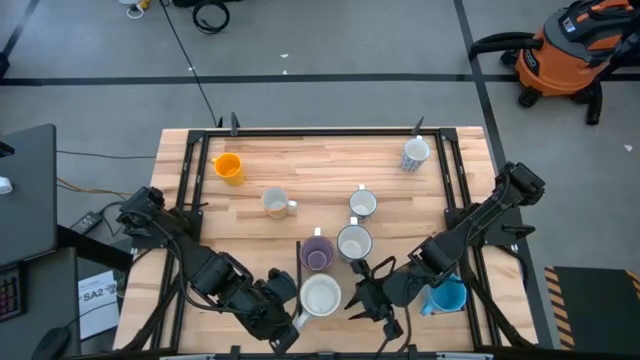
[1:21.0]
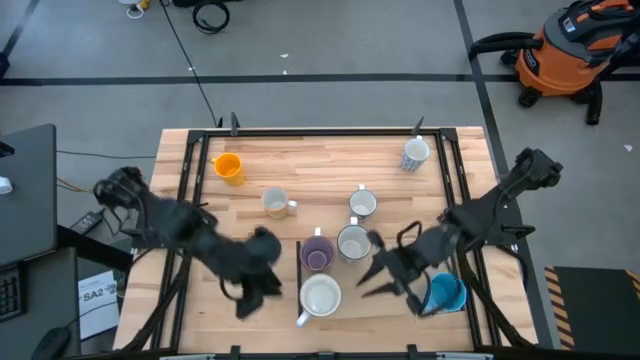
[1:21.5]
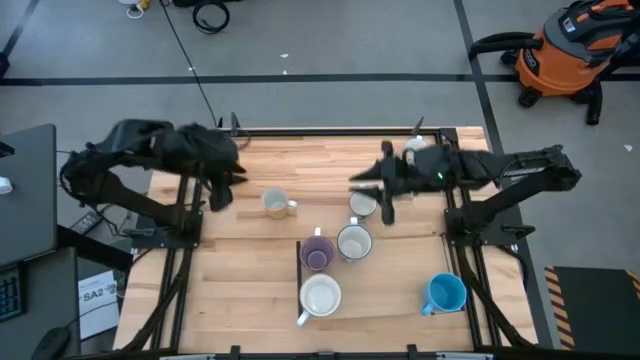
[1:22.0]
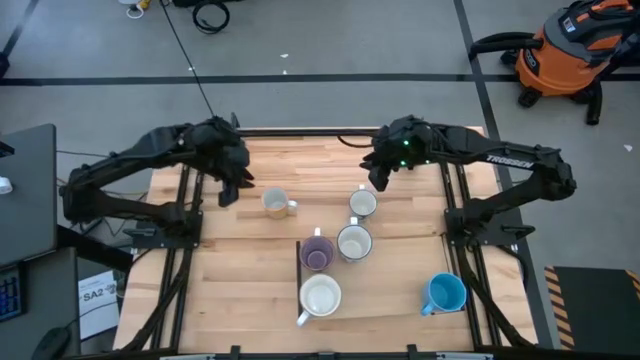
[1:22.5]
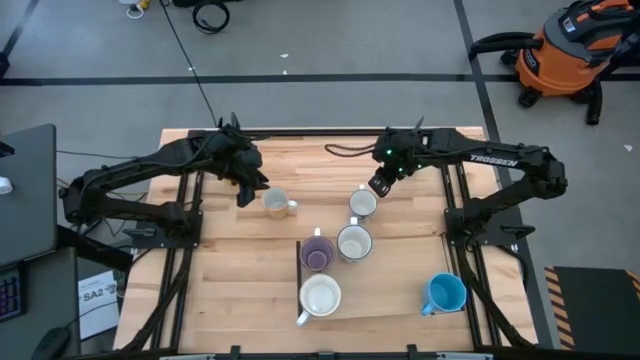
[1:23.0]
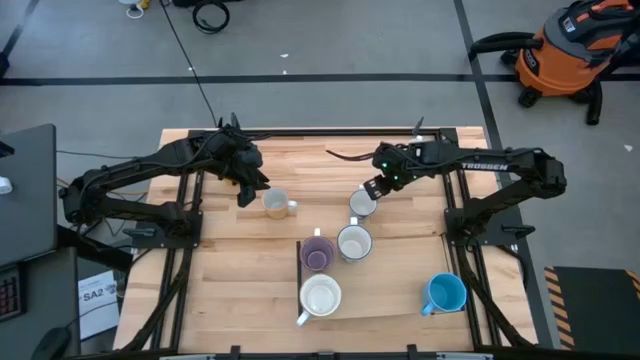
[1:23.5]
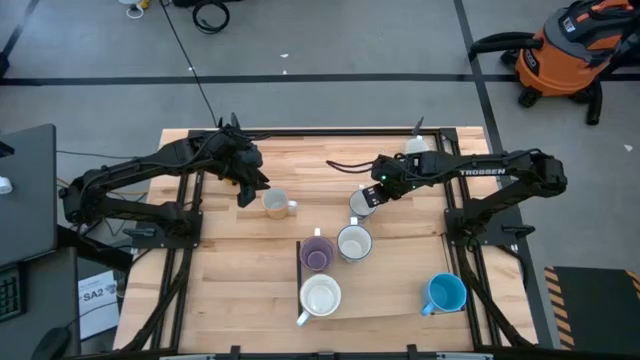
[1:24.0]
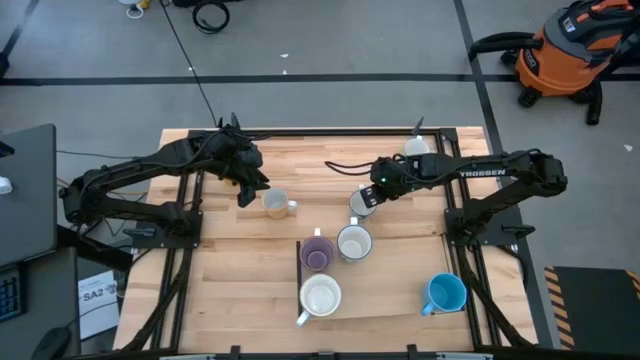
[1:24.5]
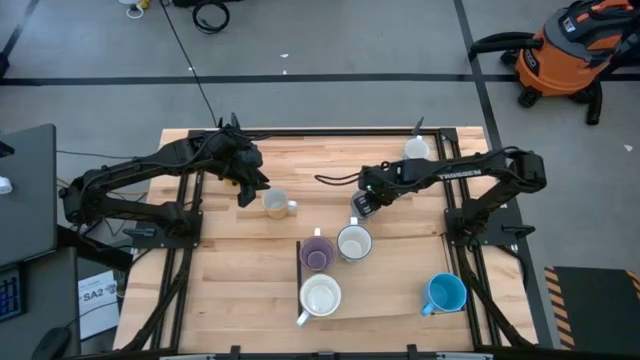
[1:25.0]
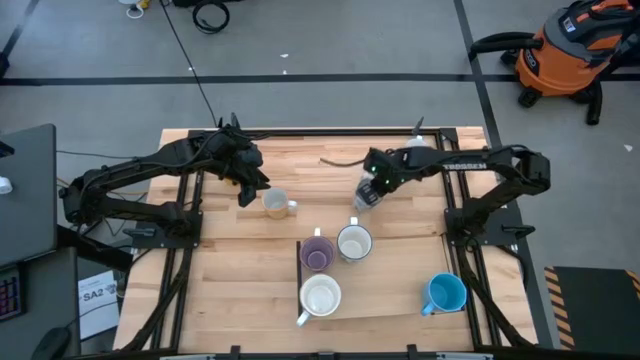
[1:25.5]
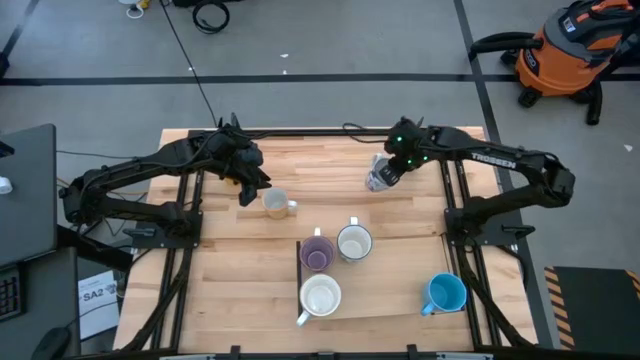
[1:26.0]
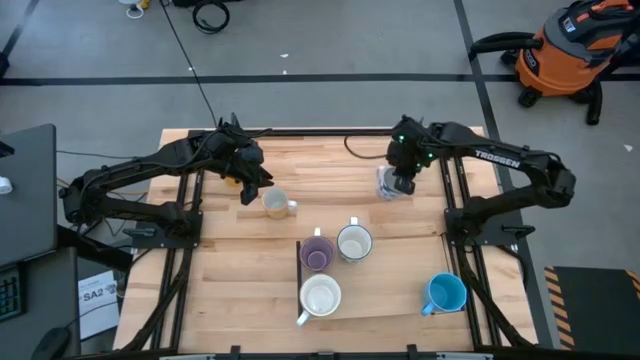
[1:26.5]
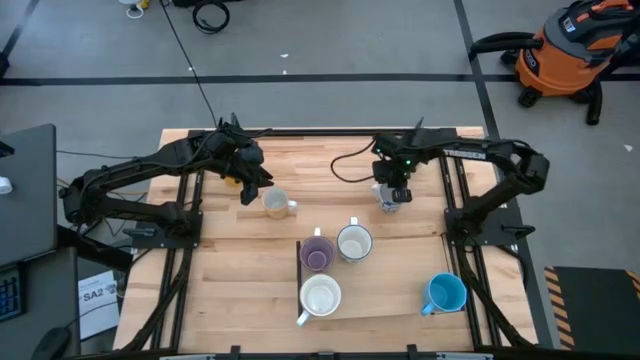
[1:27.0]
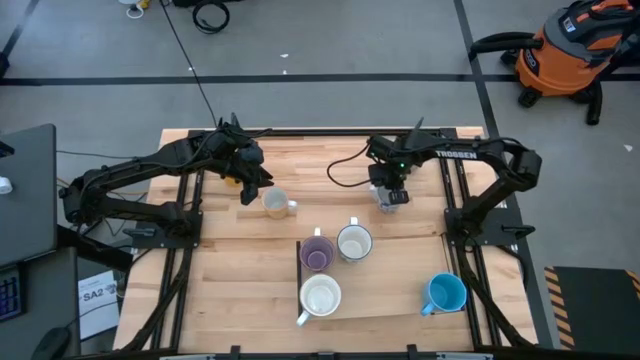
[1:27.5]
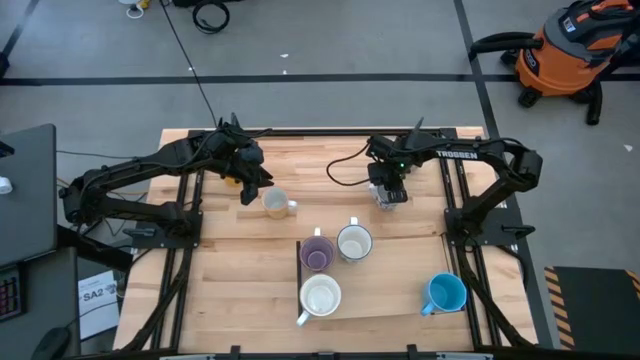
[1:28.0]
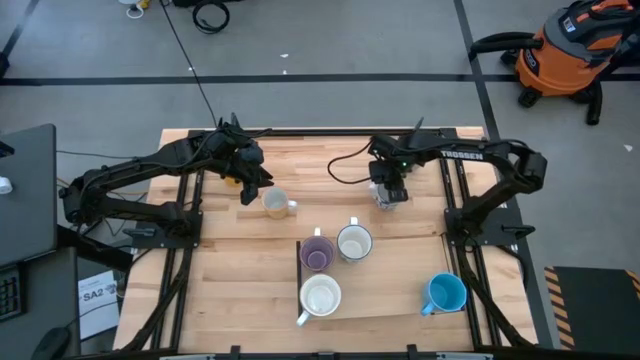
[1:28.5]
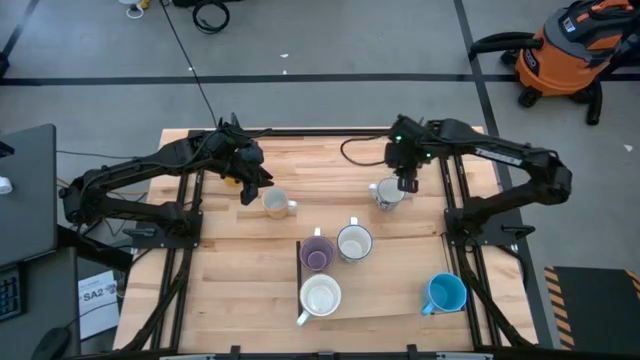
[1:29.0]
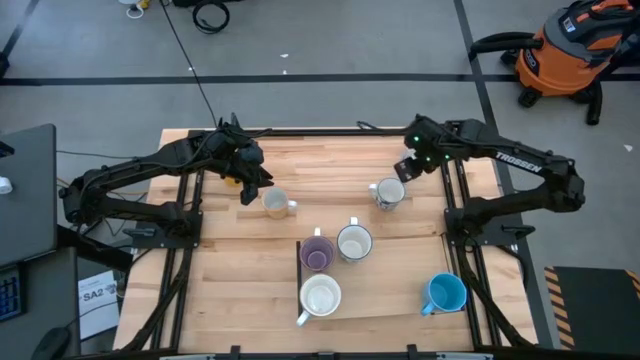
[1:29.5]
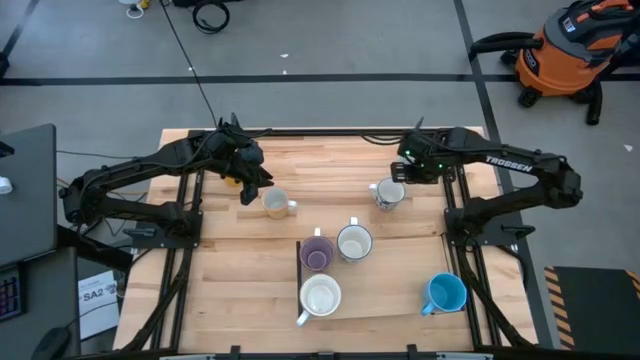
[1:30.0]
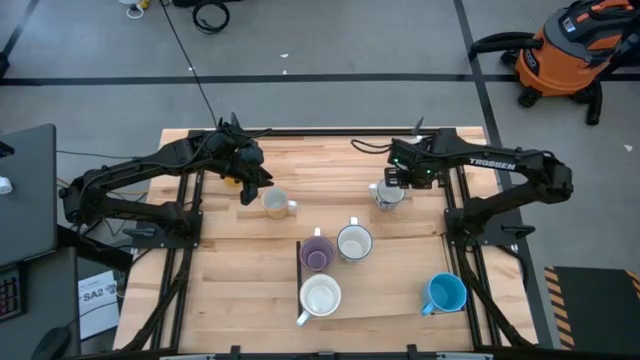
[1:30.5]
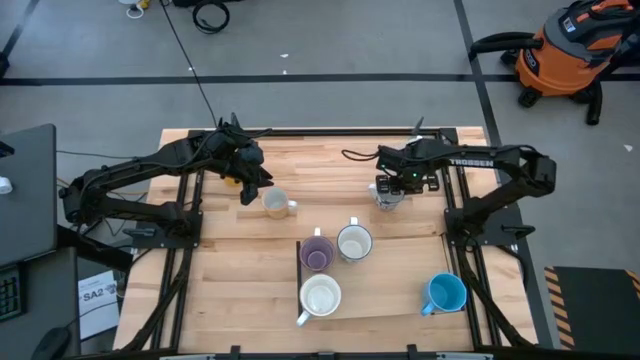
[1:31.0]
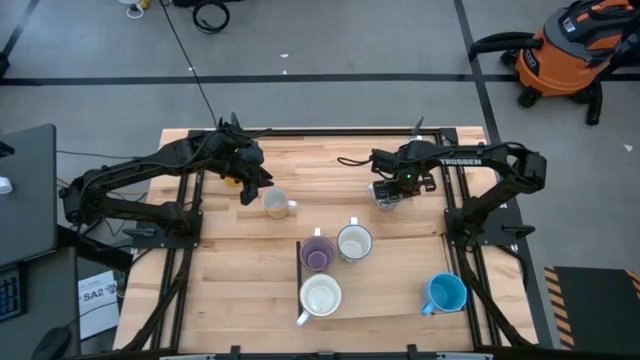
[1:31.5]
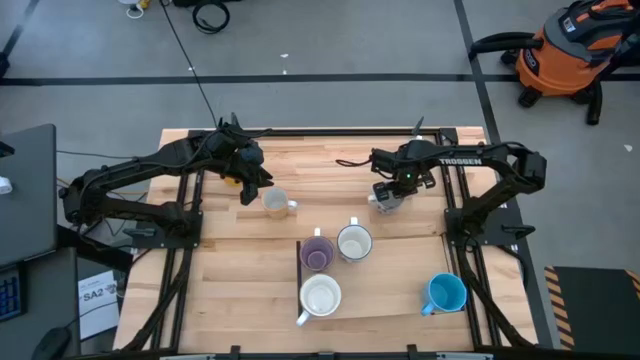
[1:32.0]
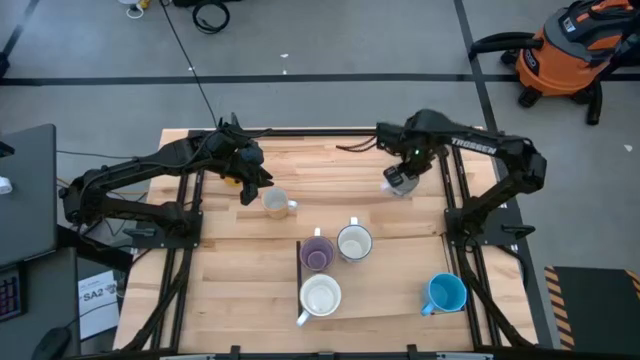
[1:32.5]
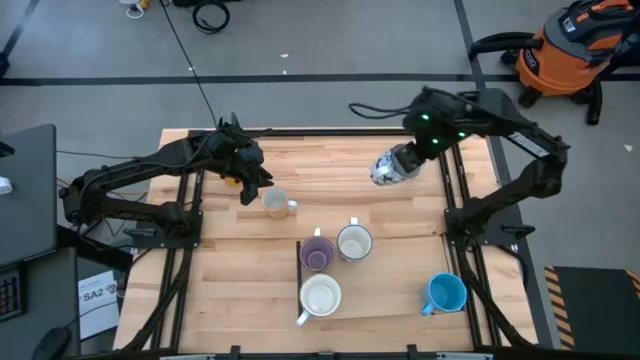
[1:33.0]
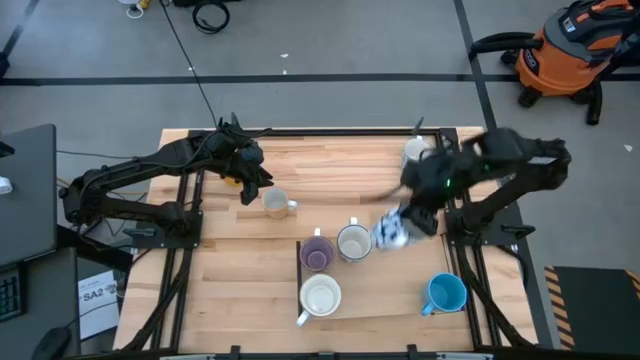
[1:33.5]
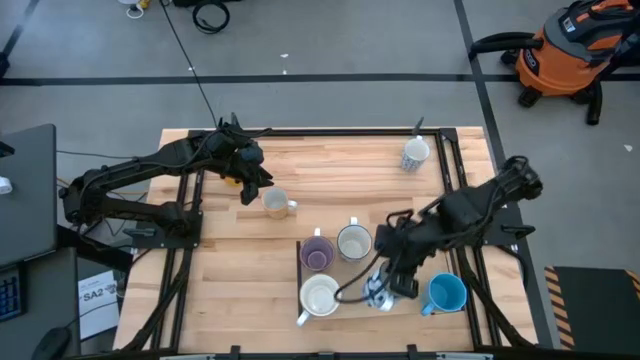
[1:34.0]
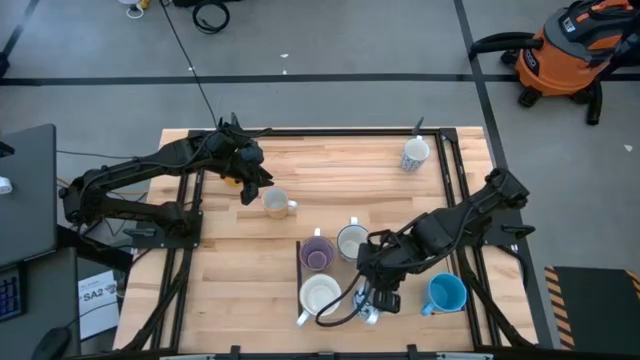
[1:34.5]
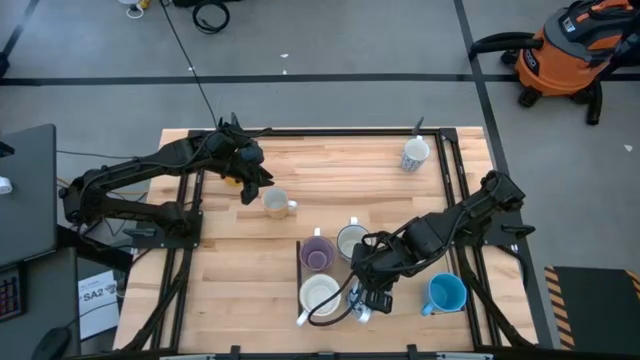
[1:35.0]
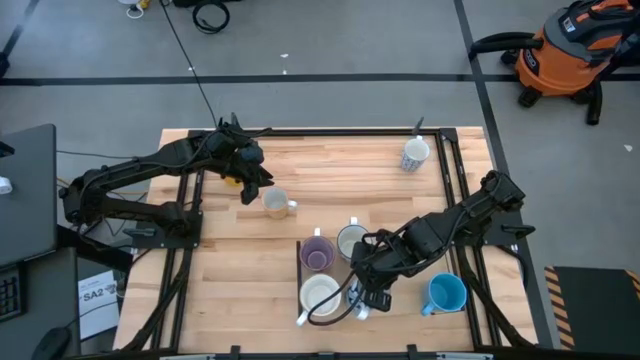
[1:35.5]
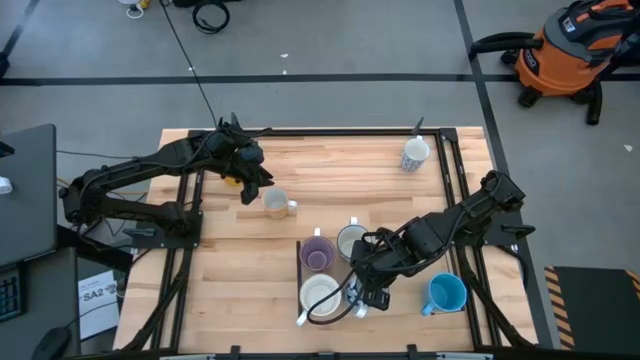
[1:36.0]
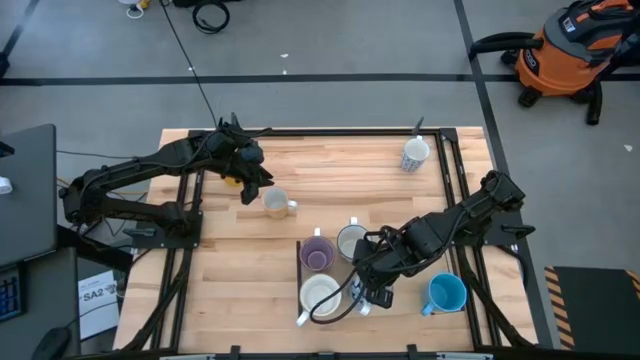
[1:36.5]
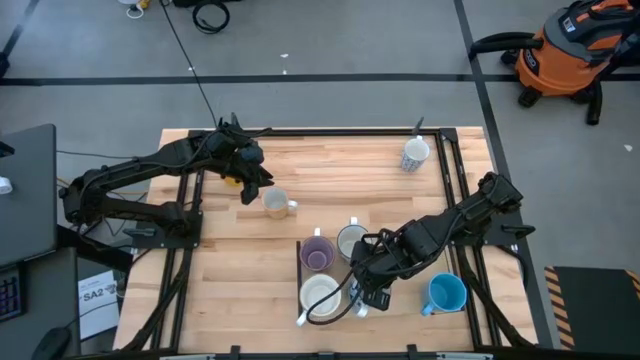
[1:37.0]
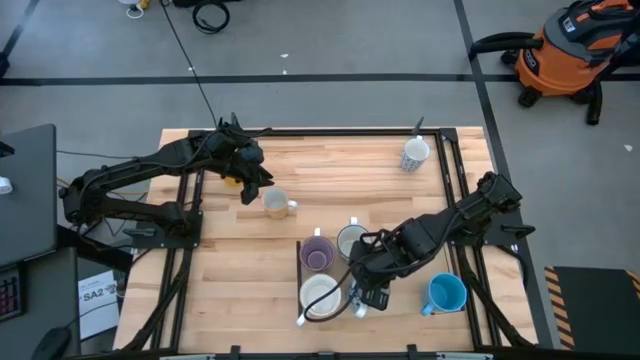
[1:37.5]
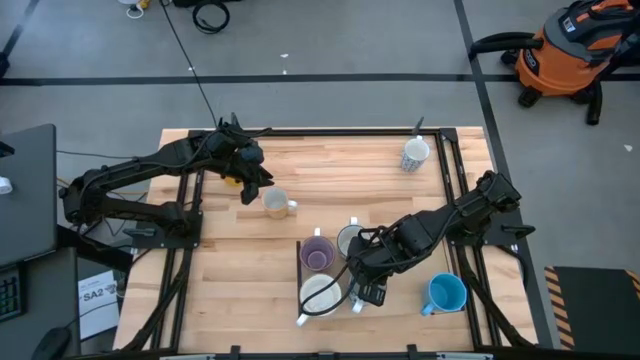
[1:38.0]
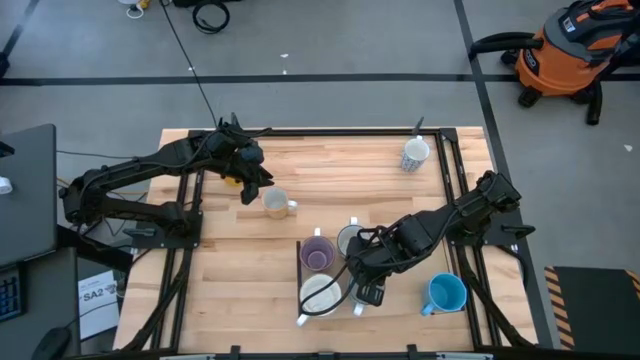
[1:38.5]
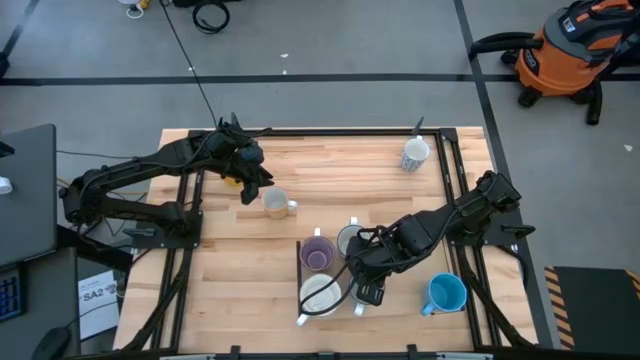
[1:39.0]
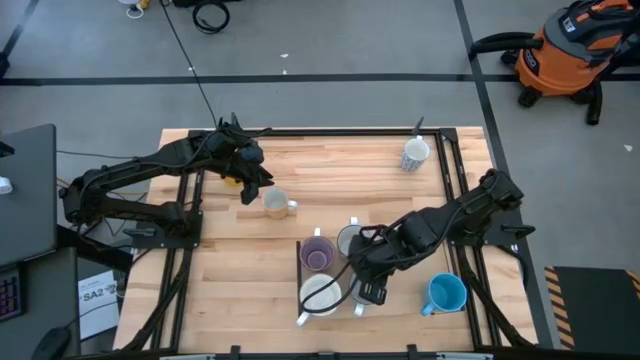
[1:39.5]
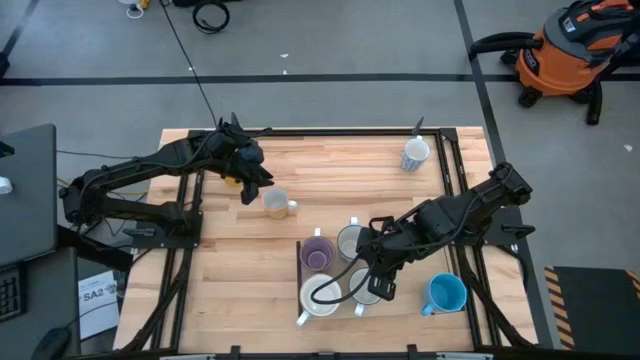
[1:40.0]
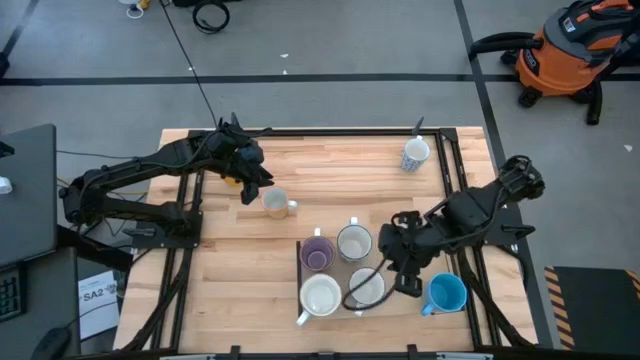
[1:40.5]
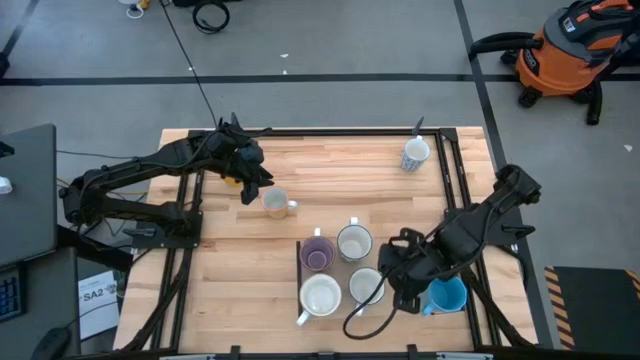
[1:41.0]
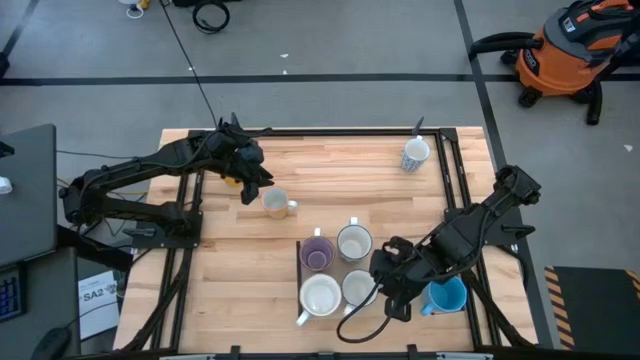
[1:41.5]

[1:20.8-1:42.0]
Task: Place coffee mugs
Put the bottom white blue patterned mug on the shelf

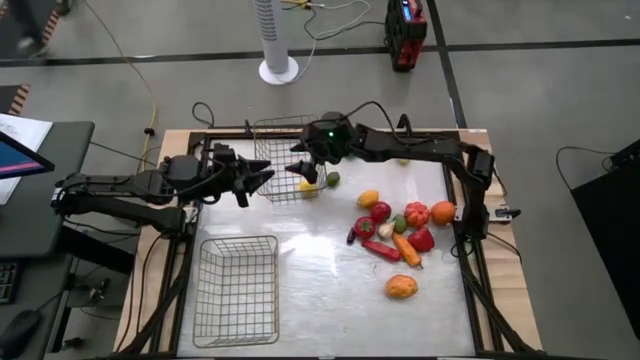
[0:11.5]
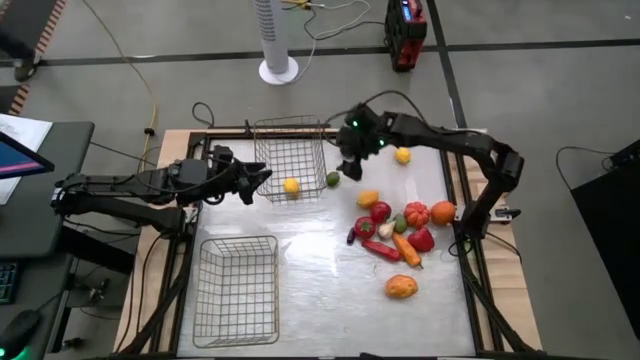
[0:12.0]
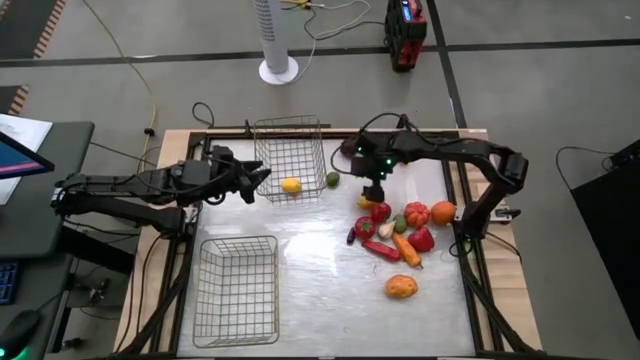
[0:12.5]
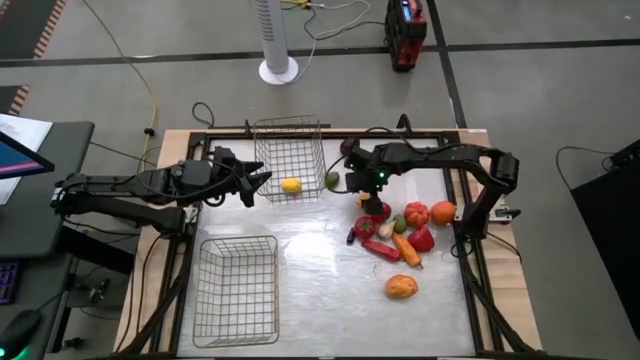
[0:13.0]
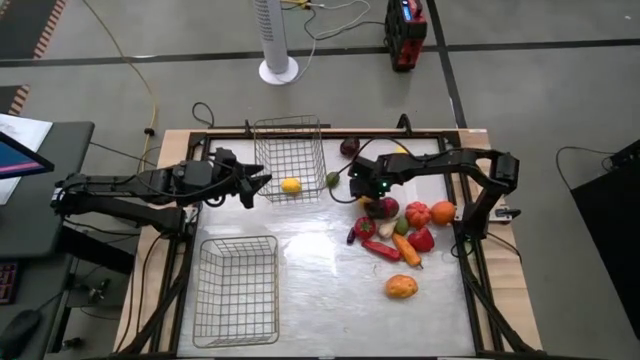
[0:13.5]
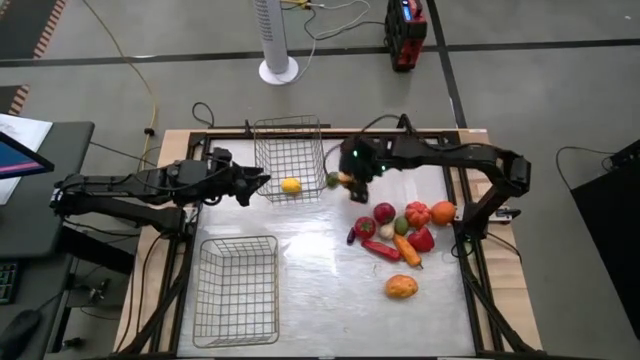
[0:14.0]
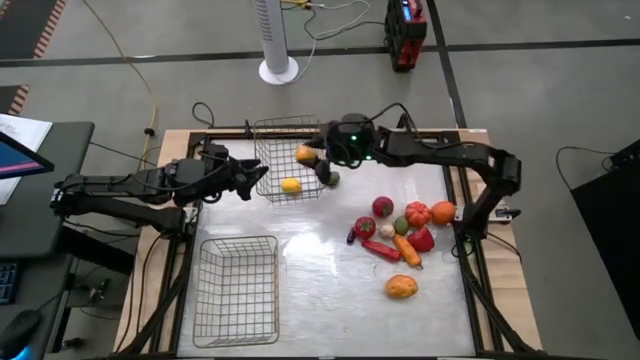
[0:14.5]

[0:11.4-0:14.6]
Task: Sort produce into baskets
Put the middle yellow lemon into the top wire basket
